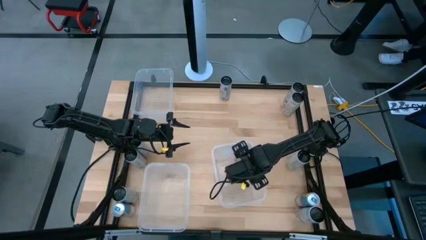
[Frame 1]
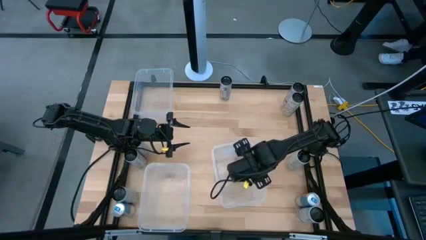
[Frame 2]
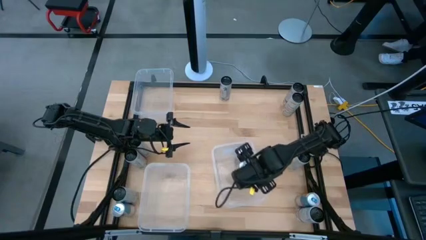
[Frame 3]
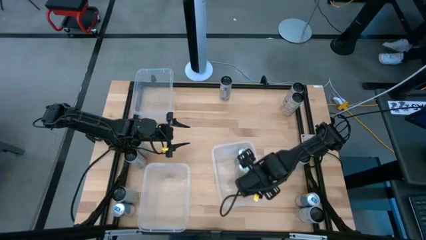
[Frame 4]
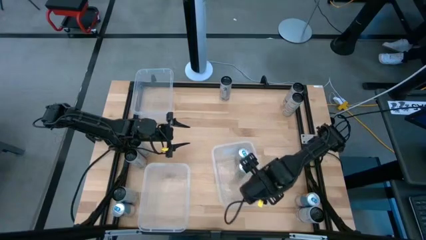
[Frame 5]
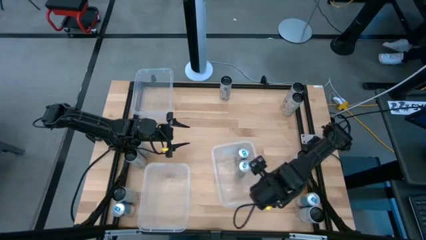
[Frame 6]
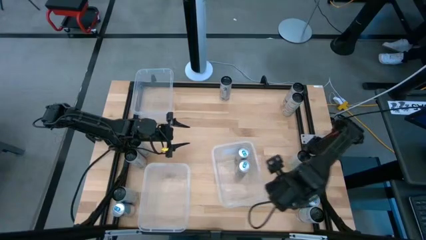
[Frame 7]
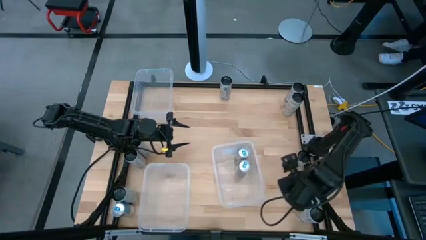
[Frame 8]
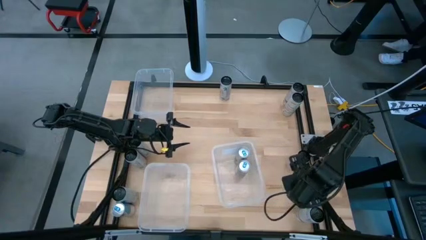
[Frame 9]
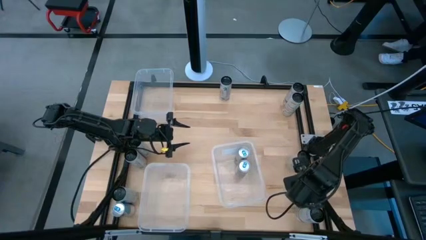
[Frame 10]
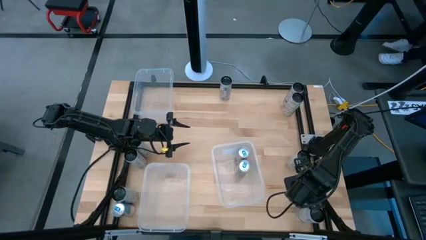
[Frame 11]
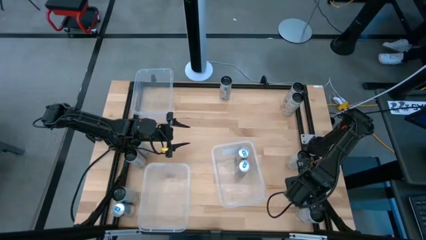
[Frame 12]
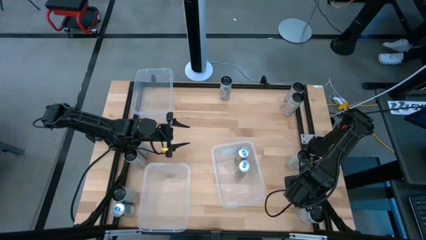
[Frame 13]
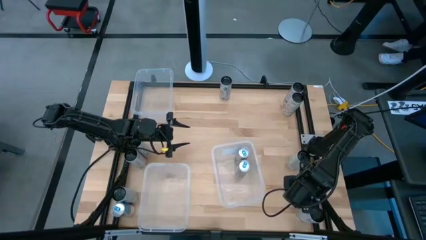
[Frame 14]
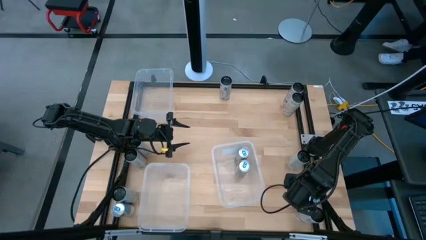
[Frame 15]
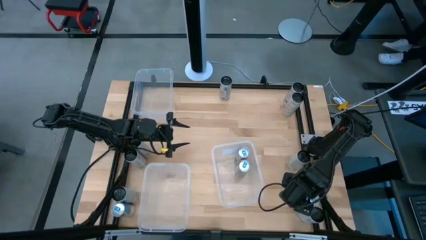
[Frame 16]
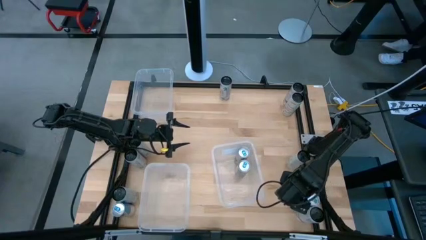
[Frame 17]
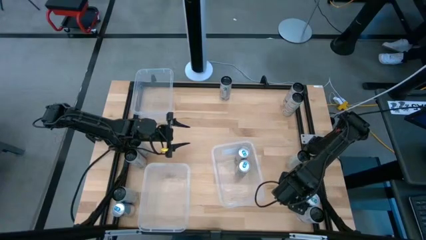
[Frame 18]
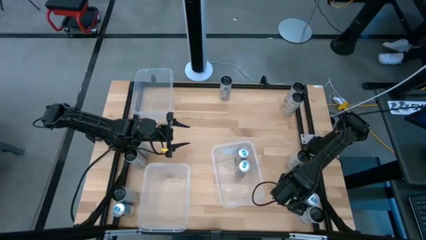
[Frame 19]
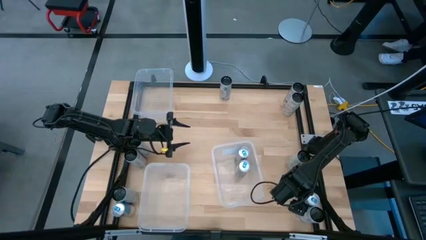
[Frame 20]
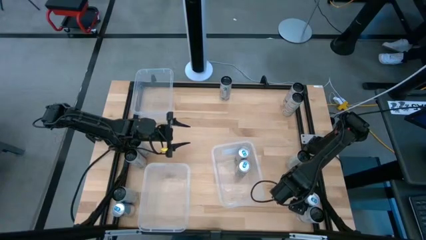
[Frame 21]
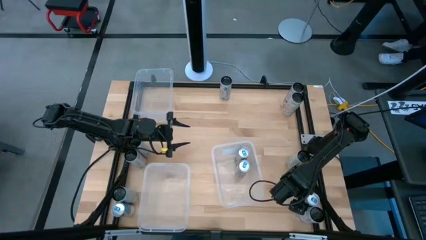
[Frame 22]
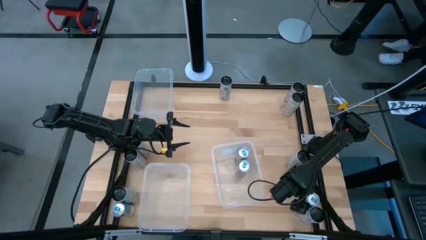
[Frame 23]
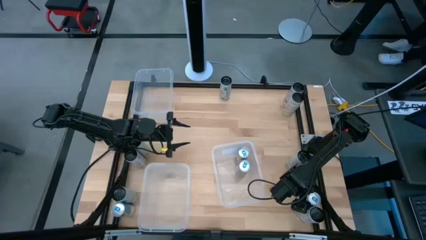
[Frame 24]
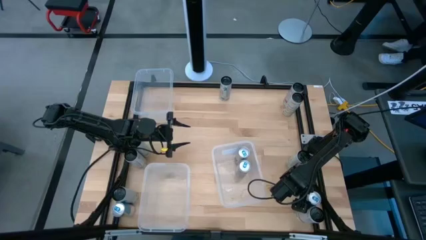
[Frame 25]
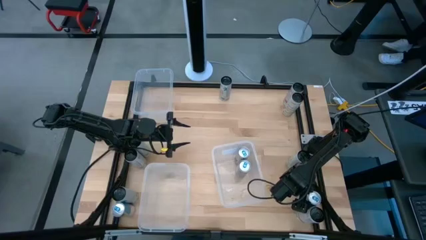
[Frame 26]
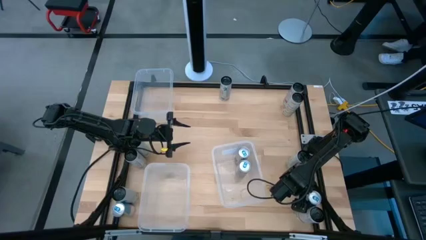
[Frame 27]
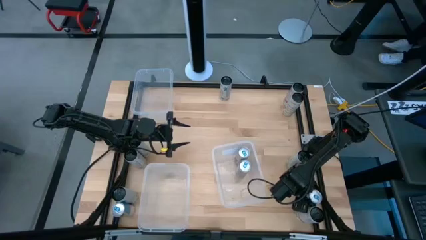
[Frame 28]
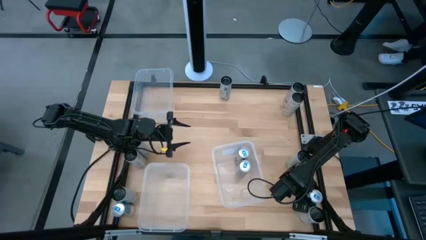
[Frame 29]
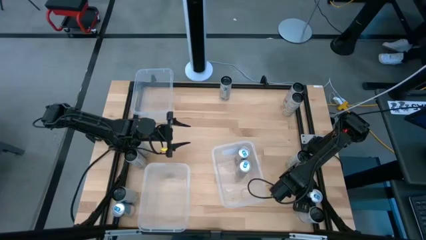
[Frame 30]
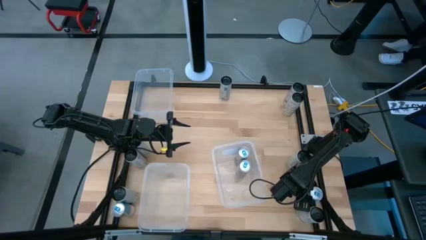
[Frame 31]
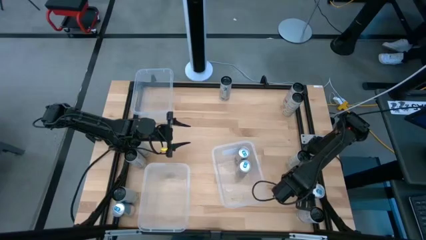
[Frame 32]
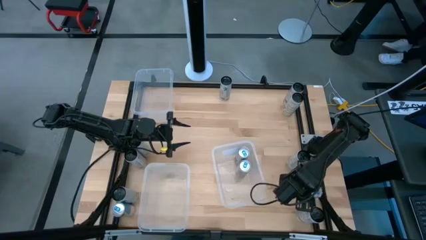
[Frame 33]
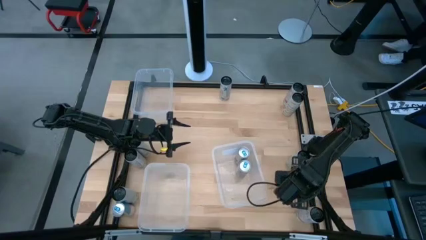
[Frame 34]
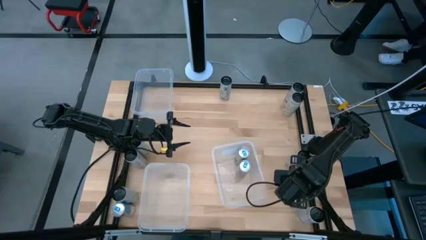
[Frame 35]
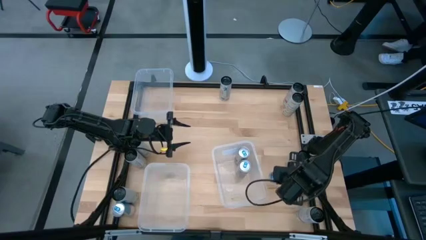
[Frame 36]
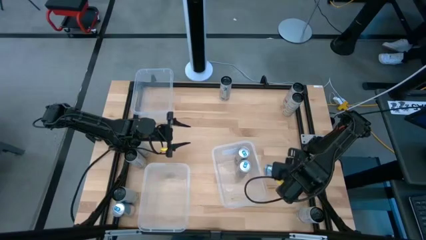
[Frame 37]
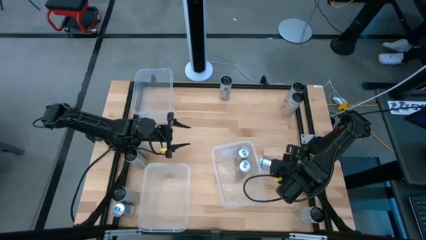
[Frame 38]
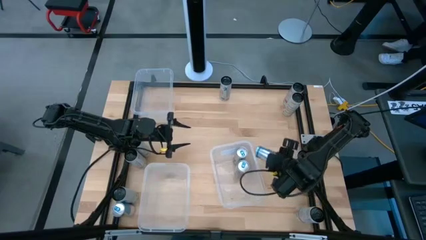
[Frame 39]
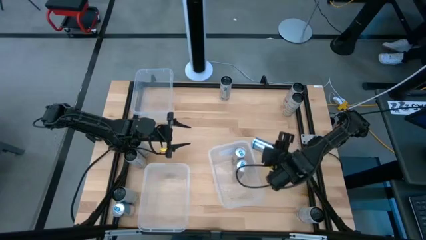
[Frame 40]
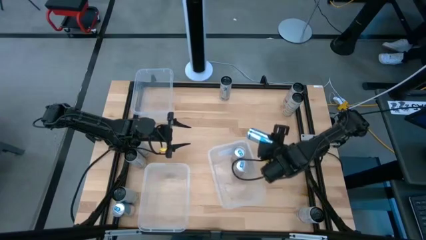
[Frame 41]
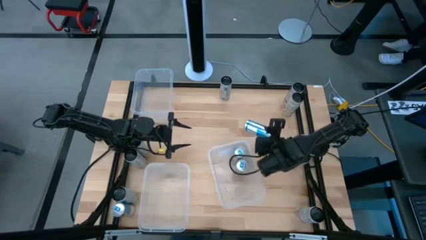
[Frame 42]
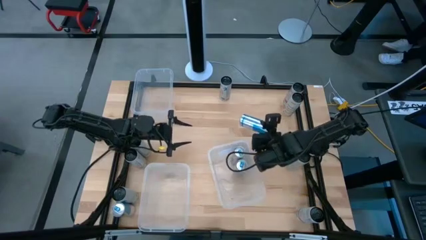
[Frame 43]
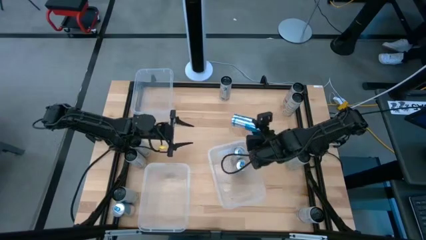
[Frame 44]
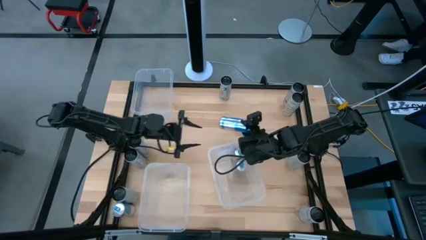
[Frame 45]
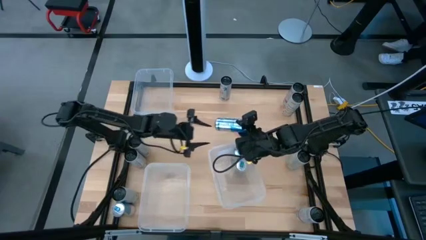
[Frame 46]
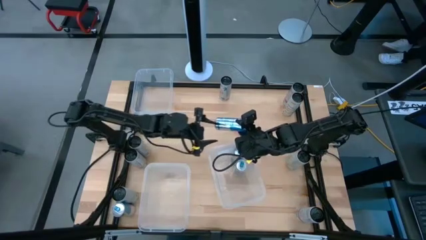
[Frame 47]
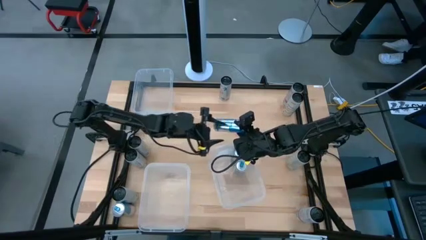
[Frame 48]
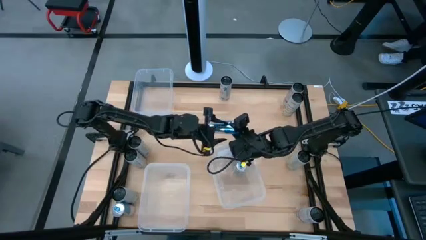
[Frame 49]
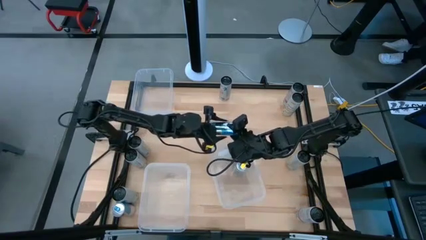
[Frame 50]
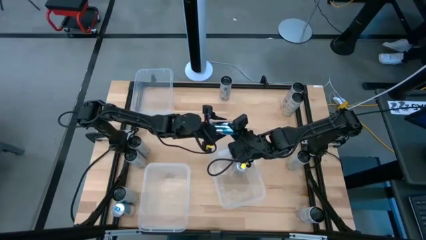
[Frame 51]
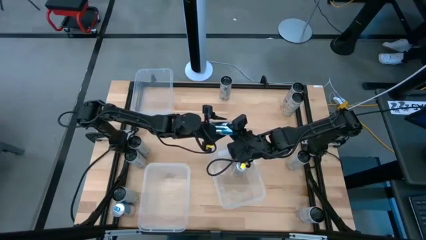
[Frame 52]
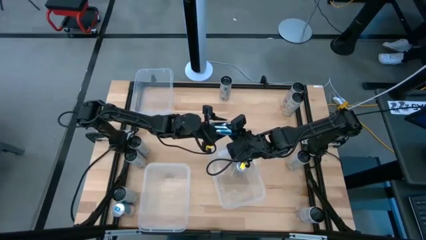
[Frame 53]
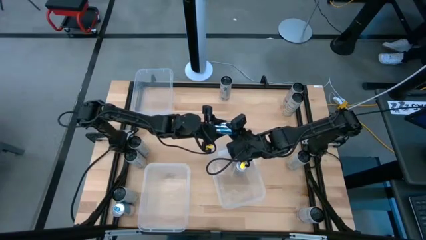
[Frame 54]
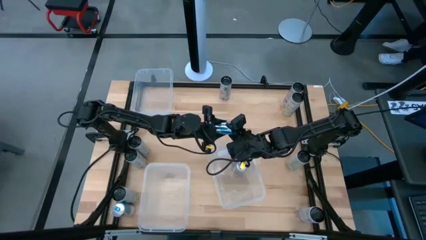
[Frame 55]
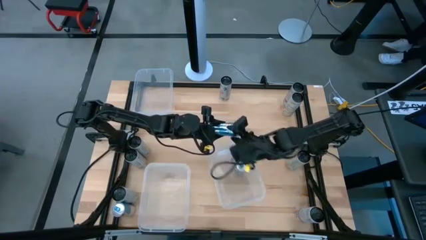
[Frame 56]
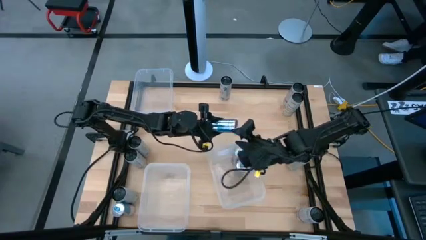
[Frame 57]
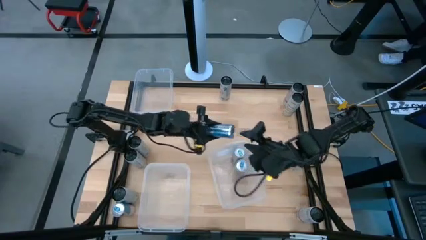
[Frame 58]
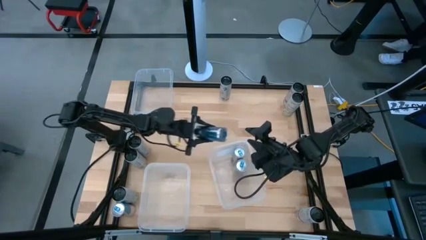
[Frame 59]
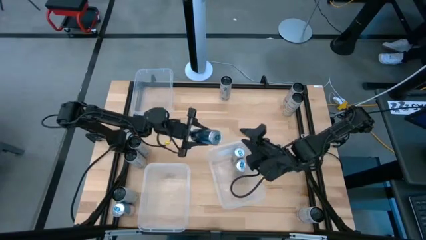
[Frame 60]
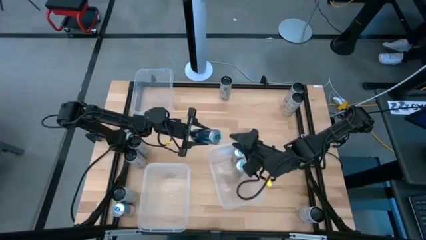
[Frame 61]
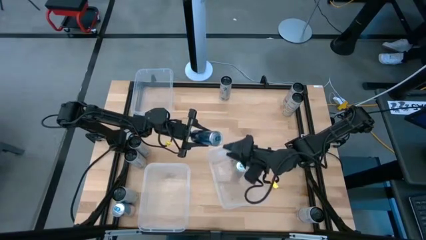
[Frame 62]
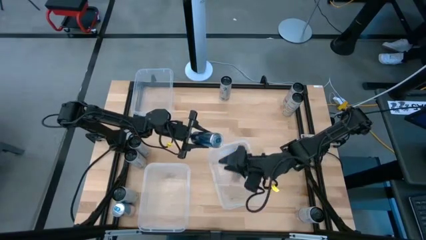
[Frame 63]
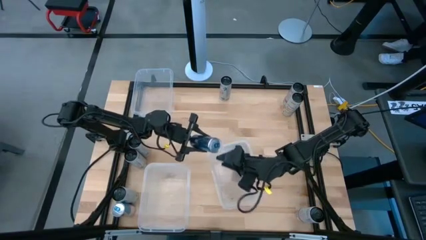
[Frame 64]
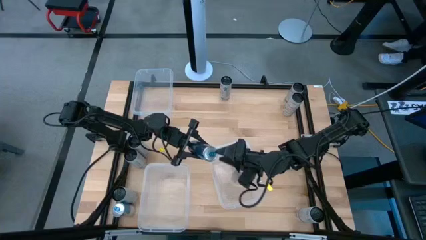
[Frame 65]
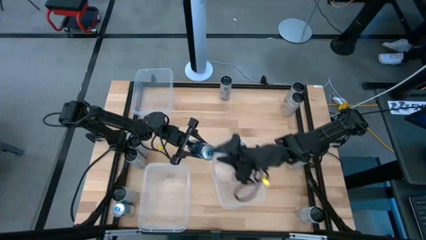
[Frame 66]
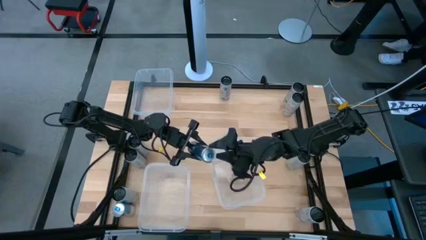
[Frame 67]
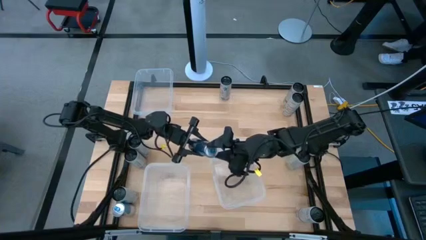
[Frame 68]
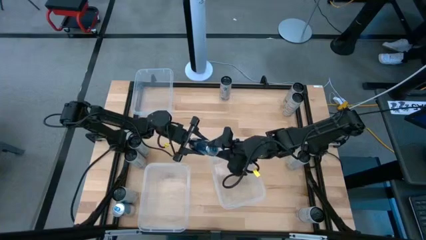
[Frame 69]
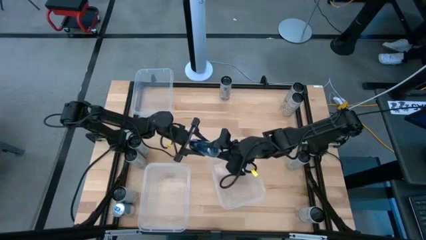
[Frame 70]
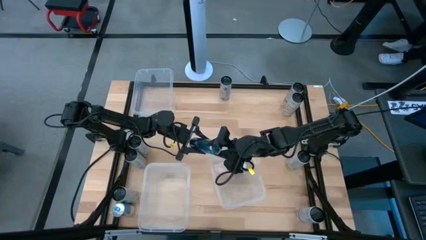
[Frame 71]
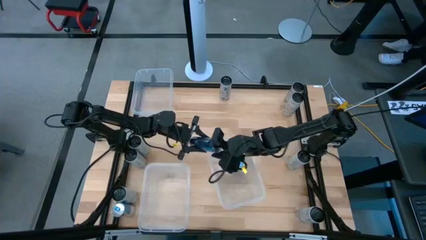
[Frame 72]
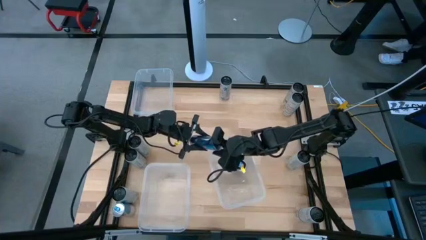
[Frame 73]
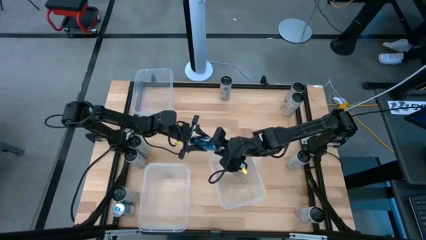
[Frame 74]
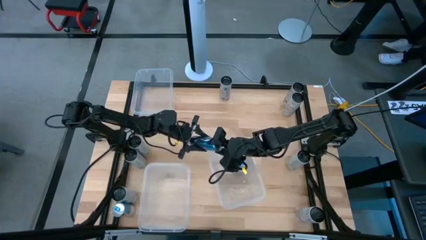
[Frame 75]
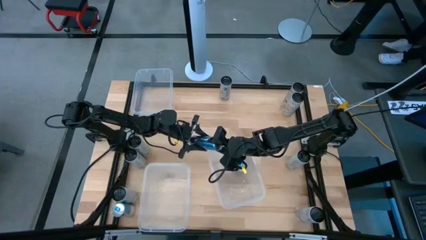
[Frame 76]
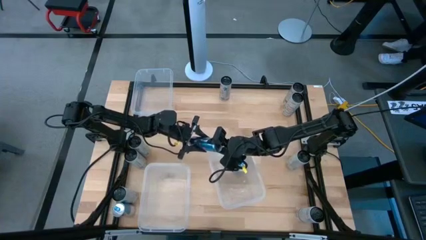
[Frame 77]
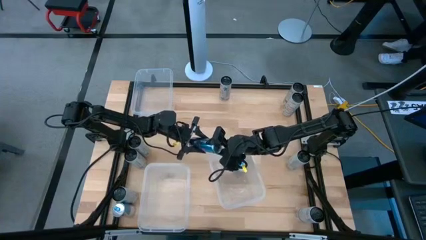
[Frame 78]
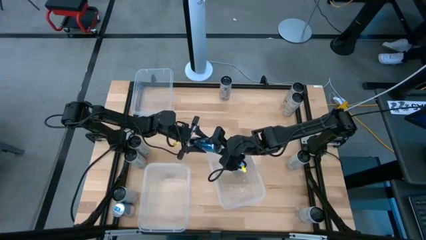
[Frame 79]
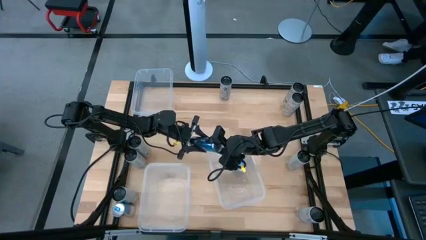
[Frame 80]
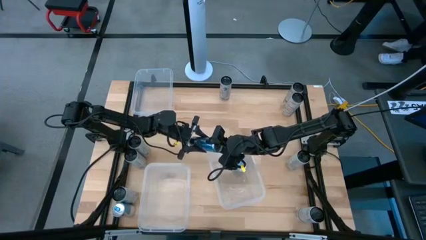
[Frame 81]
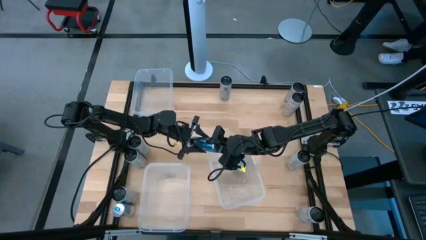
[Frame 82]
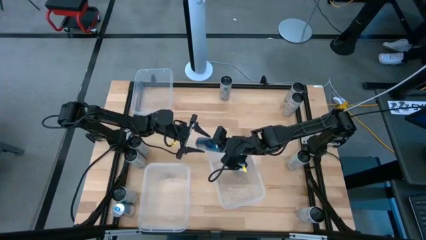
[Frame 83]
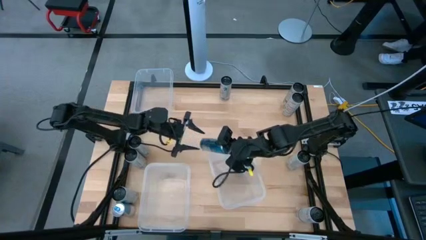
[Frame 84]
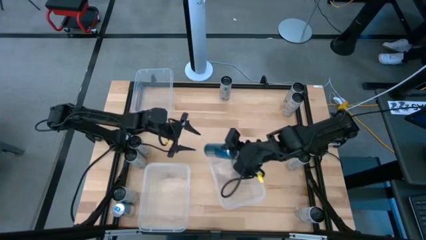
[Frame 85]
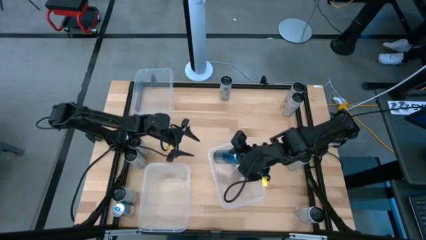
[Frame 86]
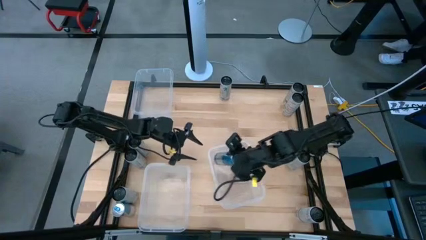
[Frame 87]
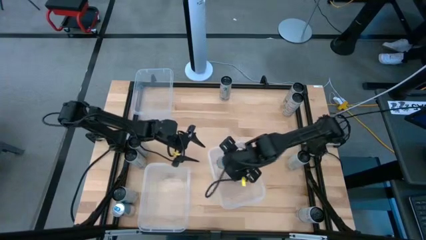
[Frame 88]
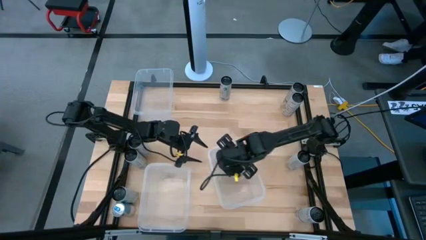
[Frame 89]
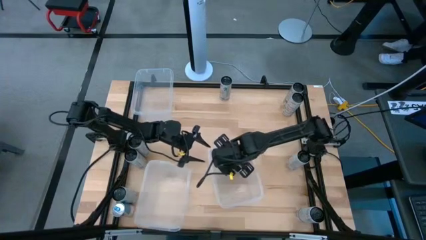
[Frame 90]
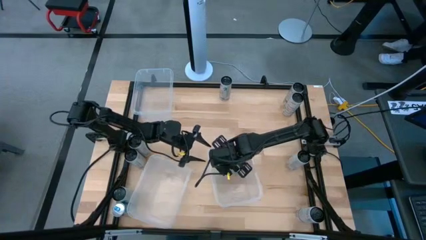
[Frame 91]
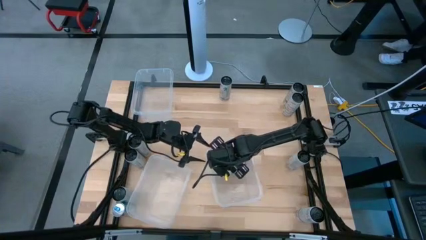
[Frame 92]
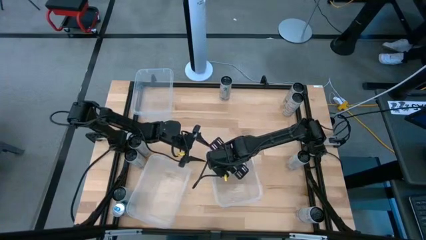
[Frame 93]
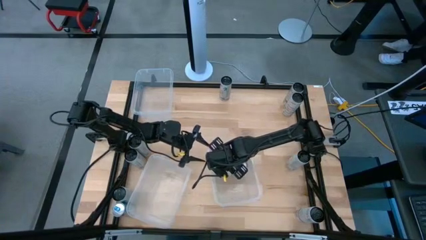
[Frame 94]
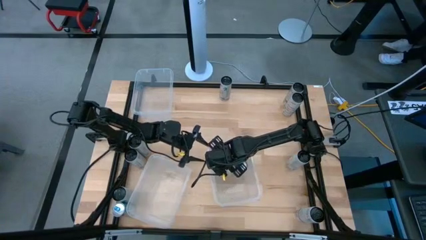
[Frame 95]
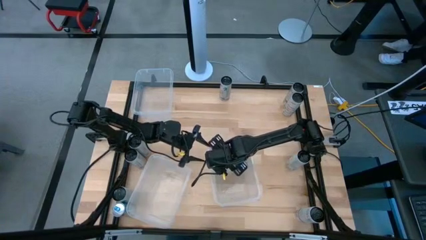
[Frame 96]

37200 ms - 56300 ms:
Task: Sort soda cans
Put the right blue soda can into the bottom right transparent bin
